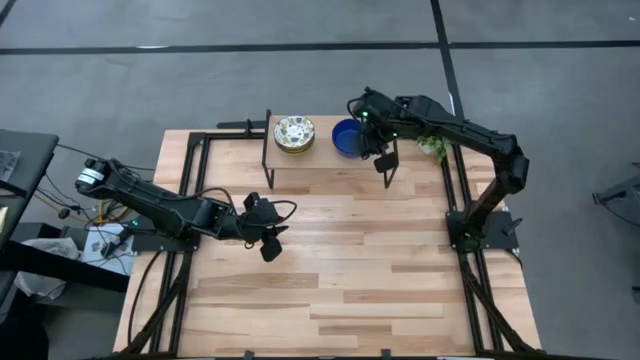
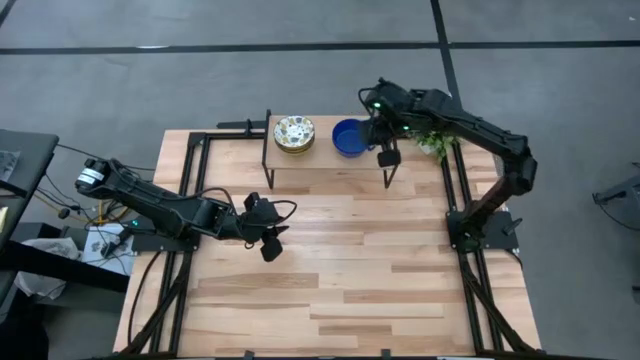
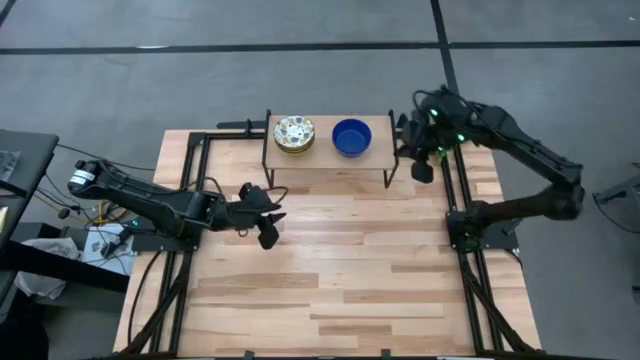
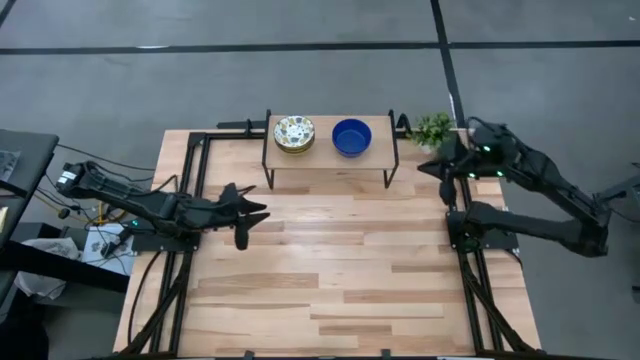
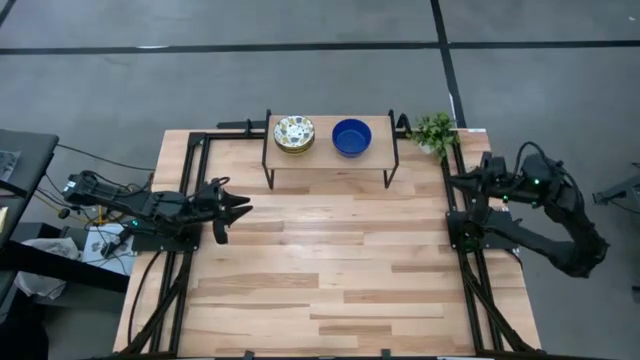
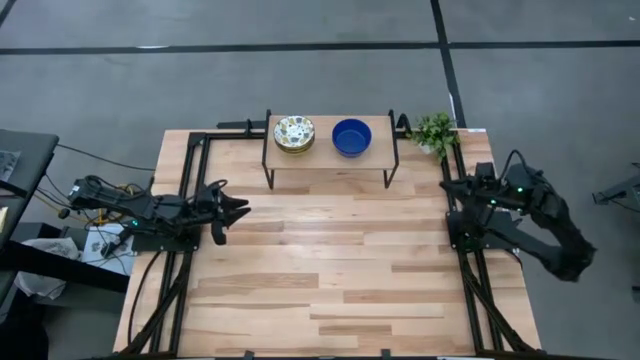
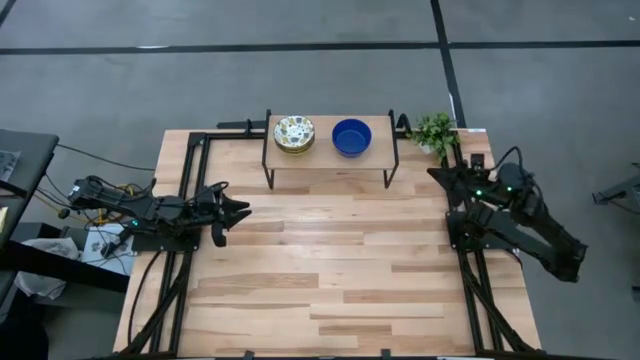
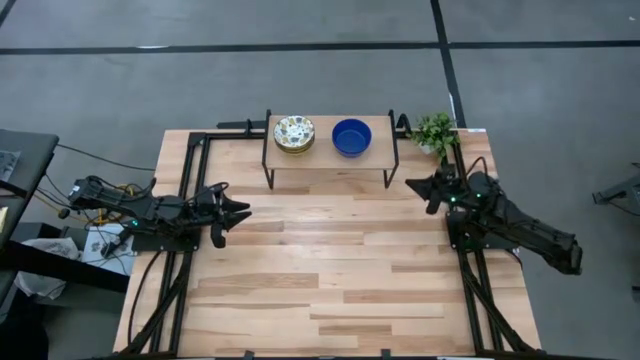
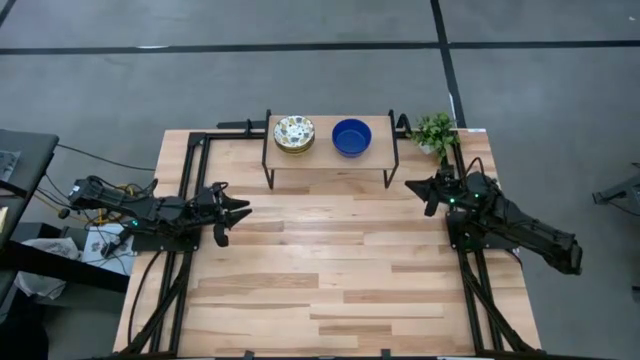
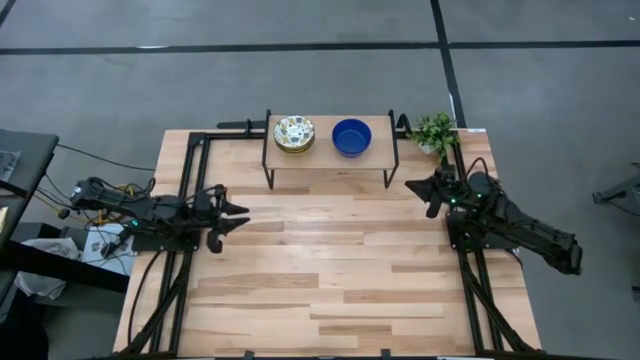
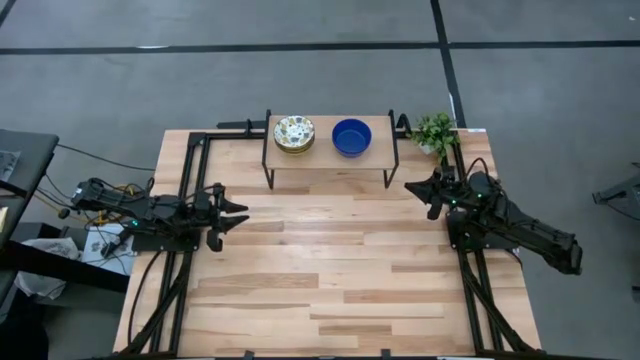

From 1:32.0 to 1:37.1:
Task: Pick & Place Mini bowls
Return to Home Position

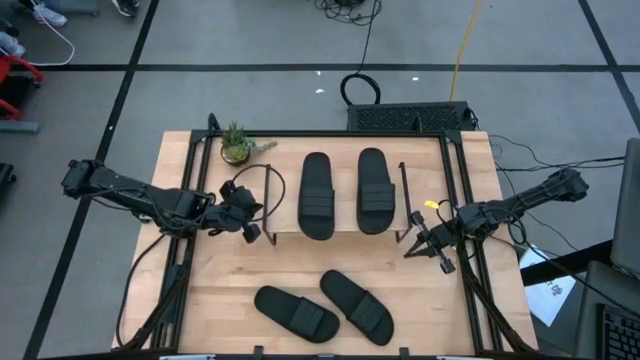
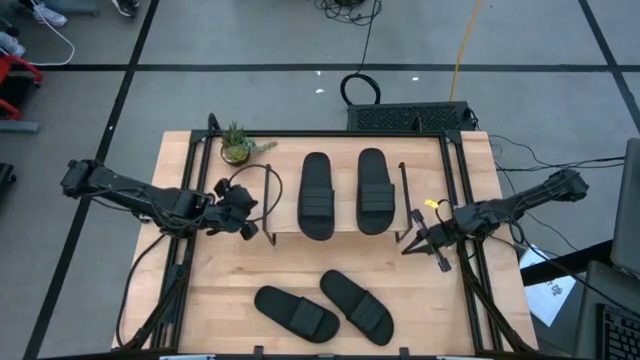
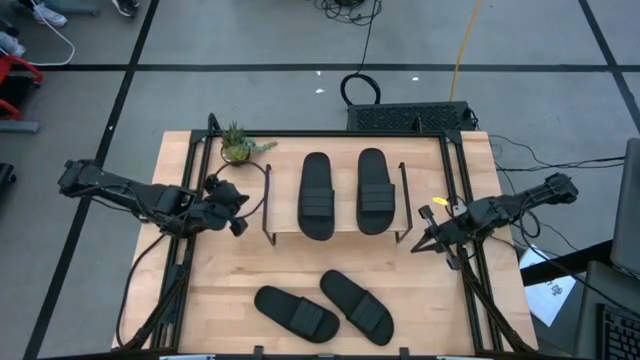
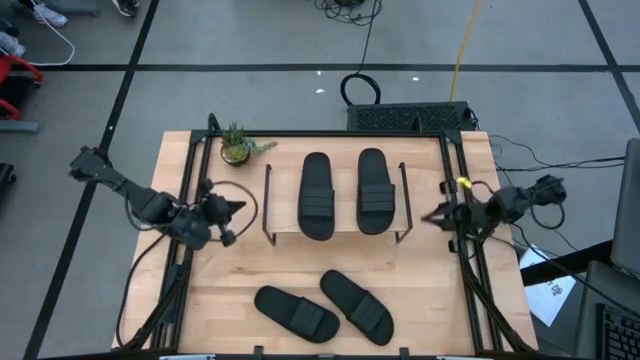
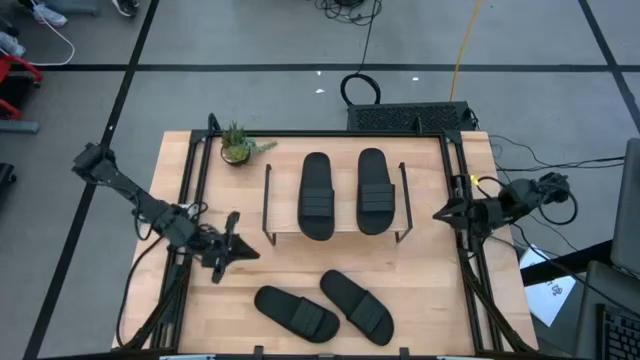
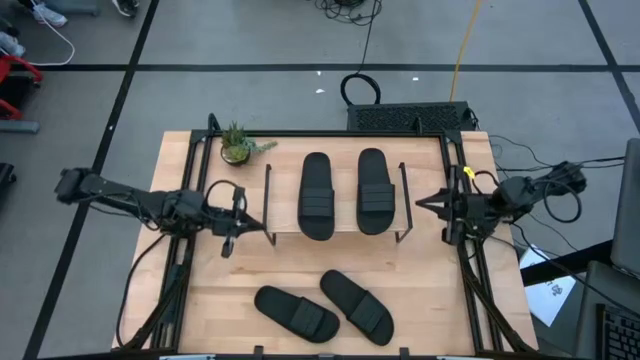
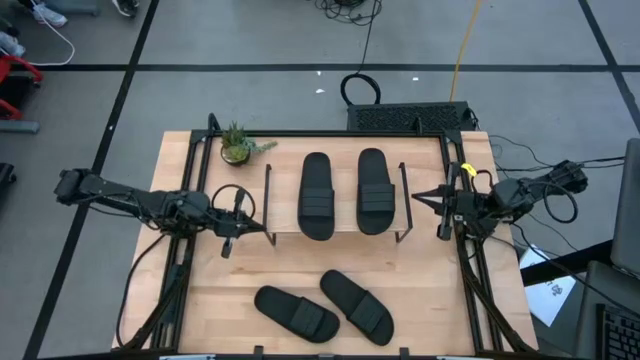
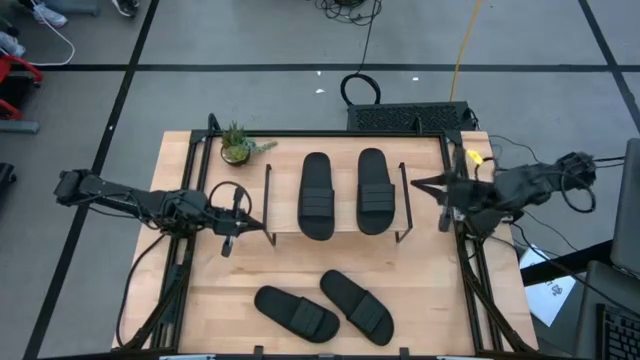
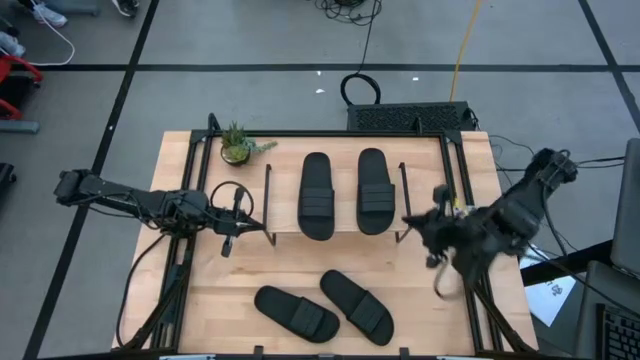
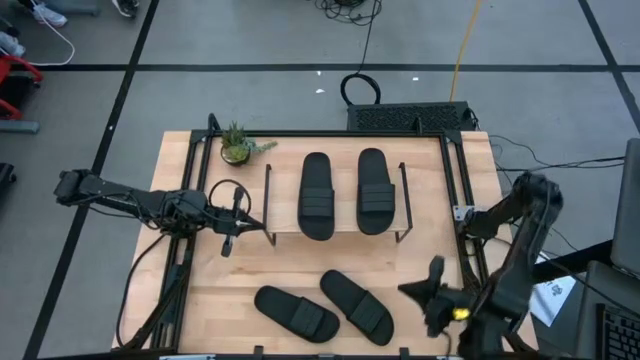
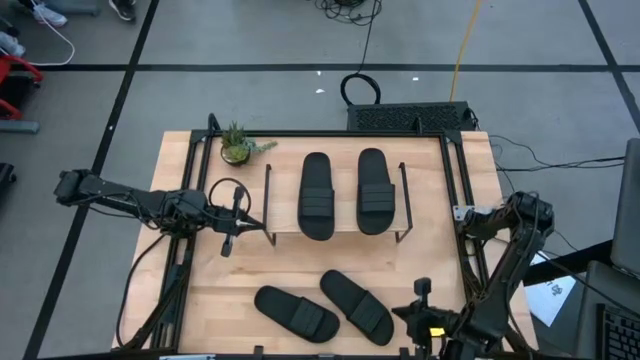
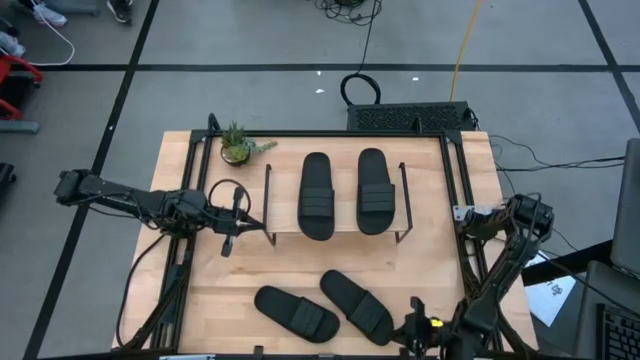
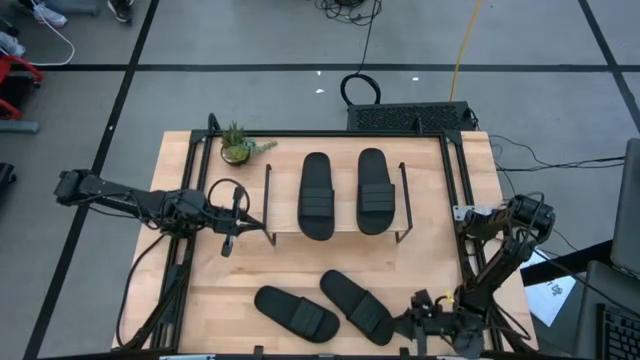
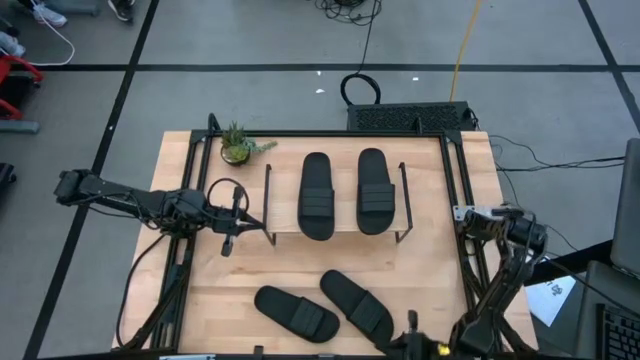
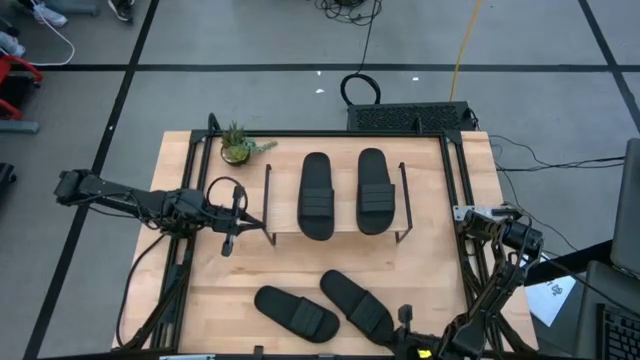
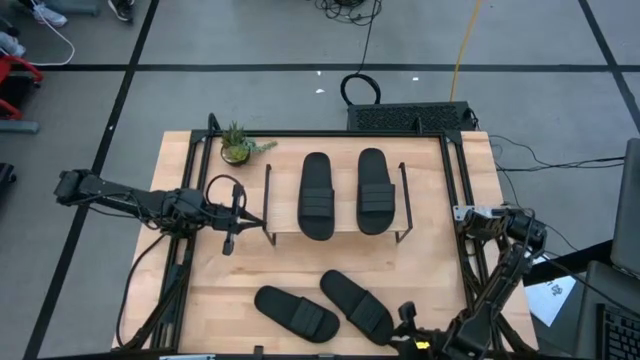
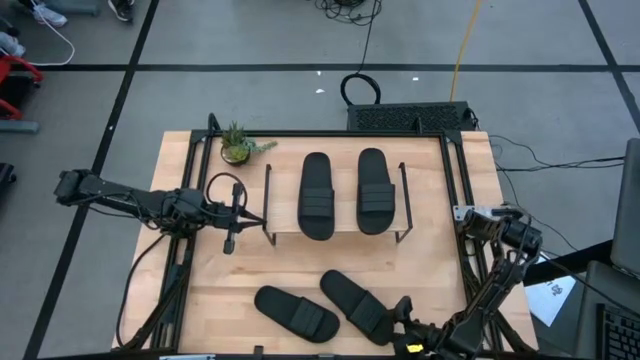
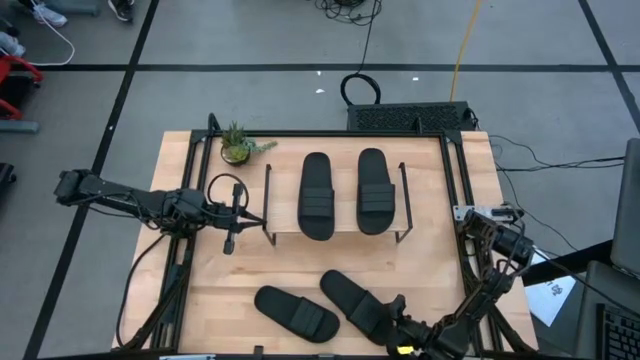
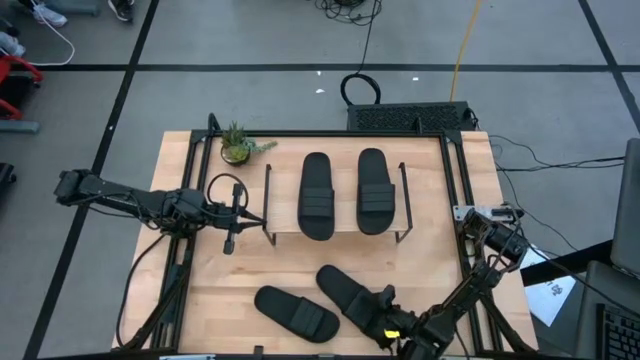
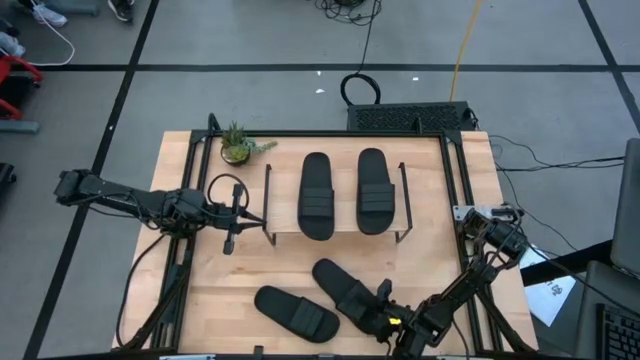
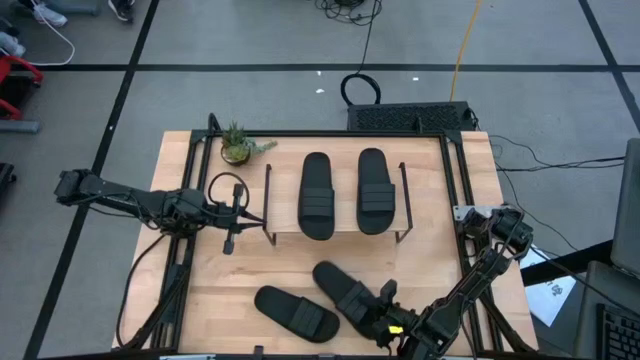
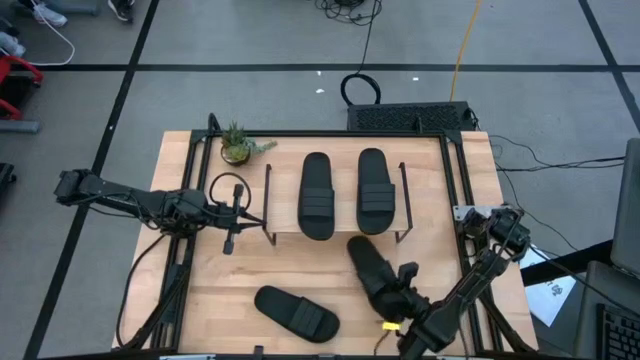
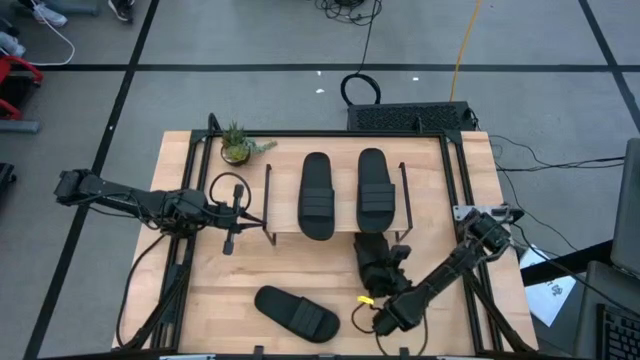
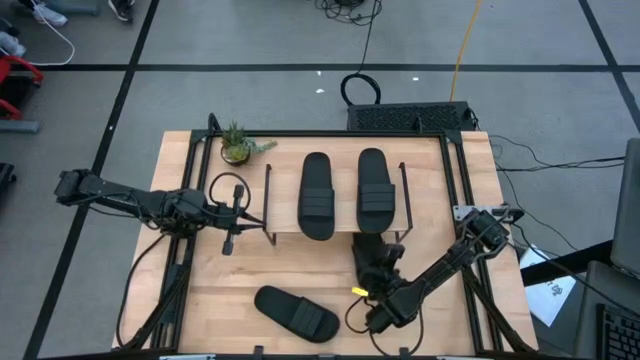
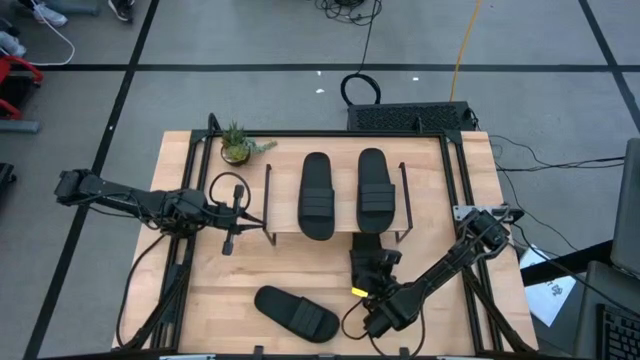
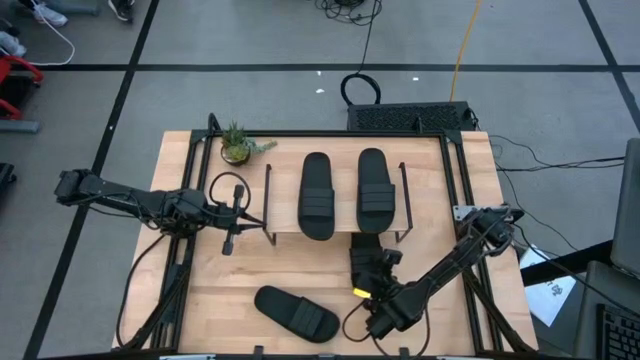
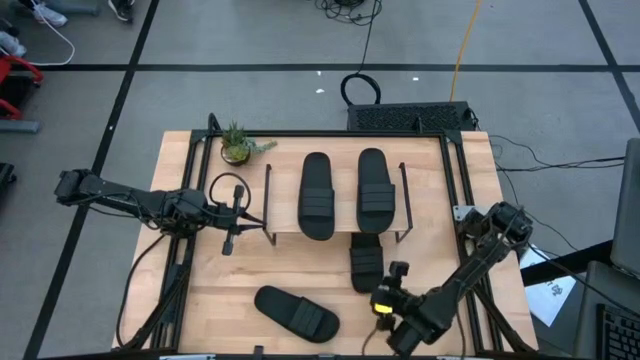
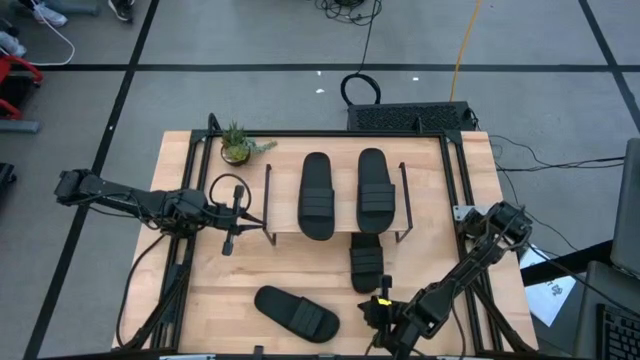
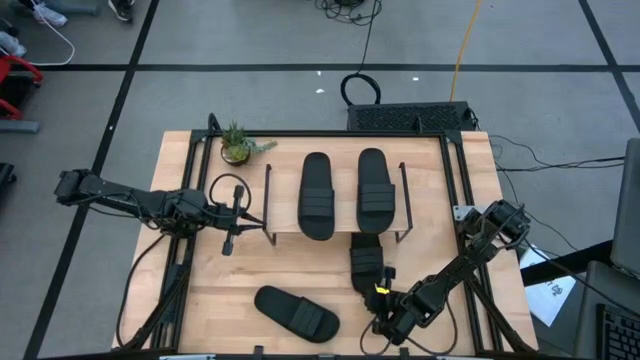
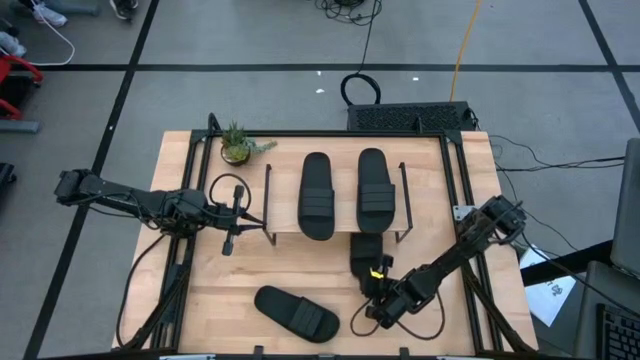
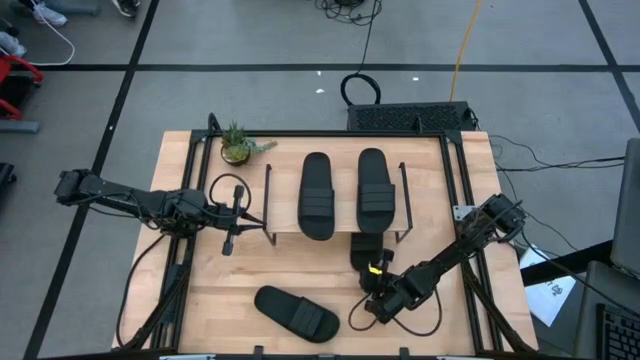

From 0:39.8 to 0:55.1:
Task: Pick and place slides into the shelf
Put the black slipper under the shelf
